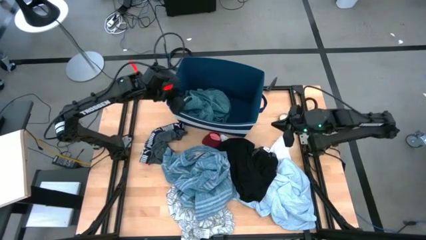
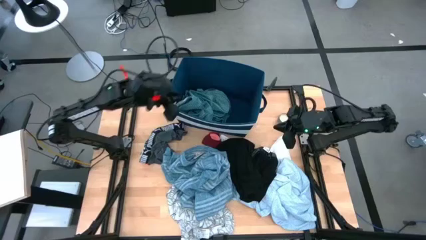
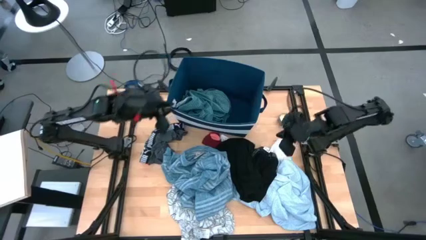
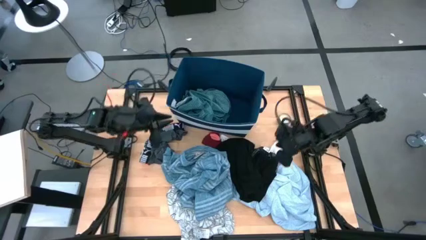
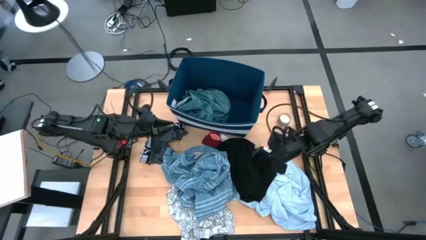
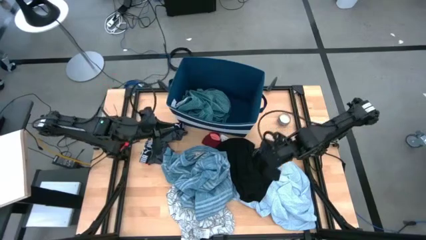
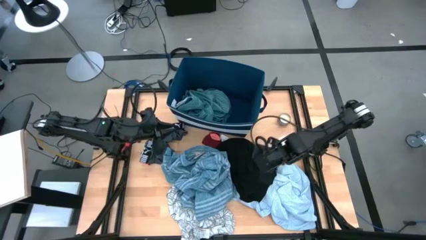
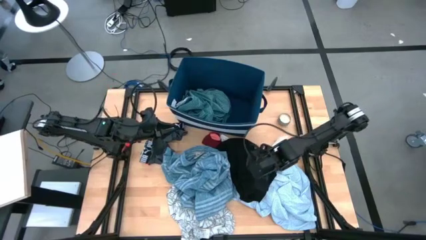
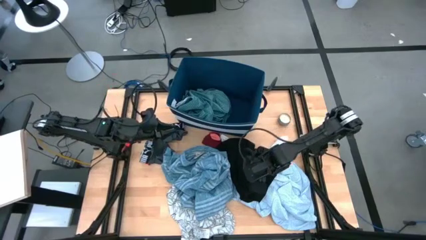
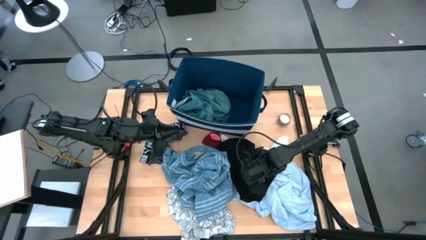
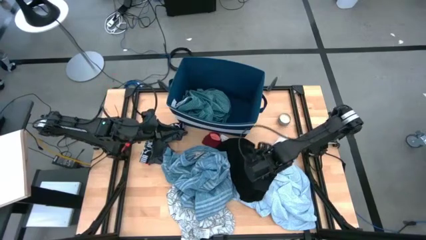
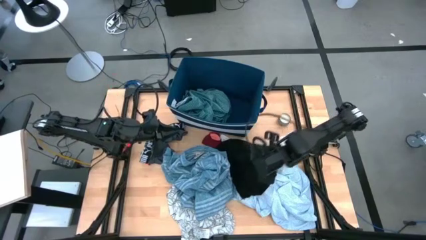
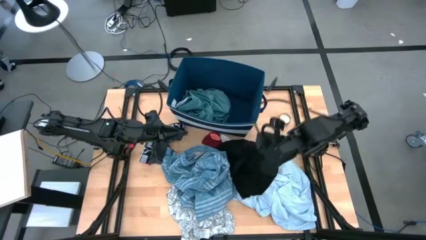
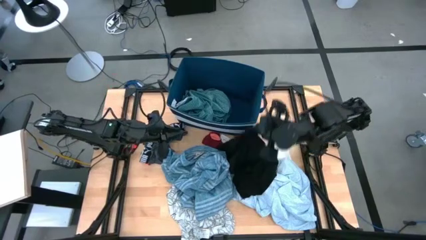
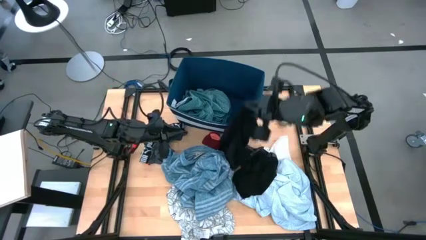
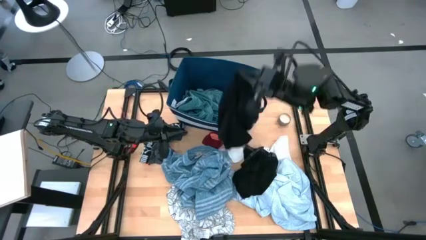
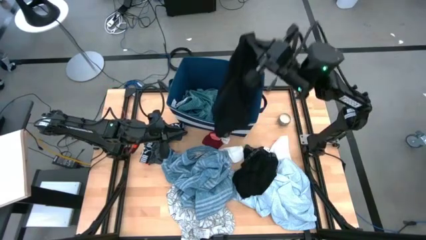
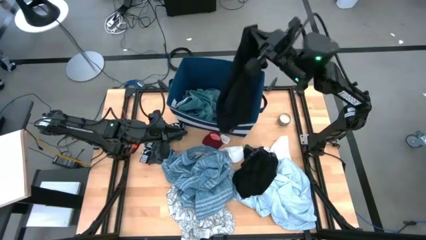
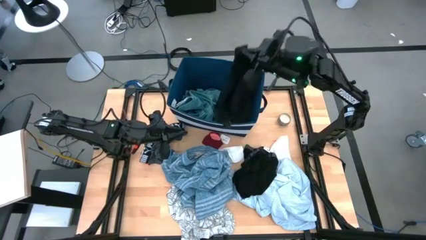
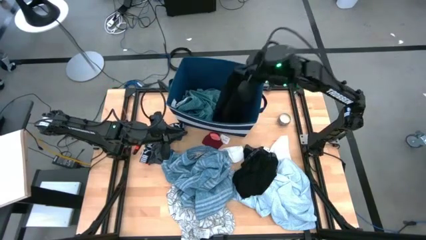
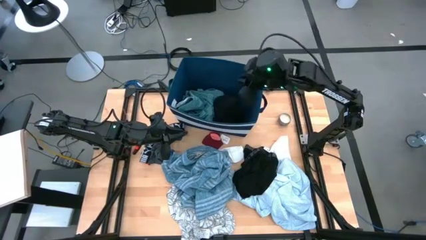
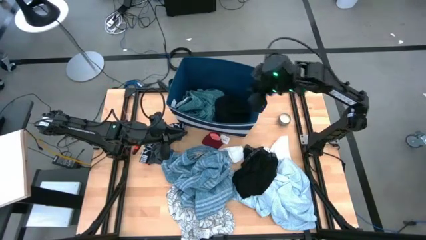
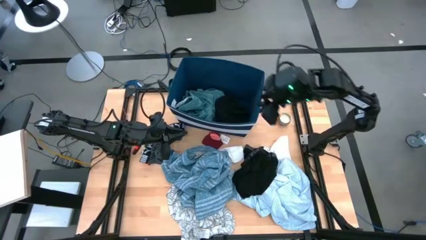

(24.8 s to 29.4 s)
Task: Sort clothes
Put the black boxer into the blue bin

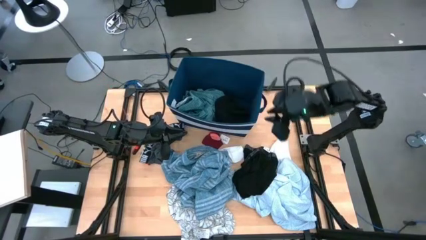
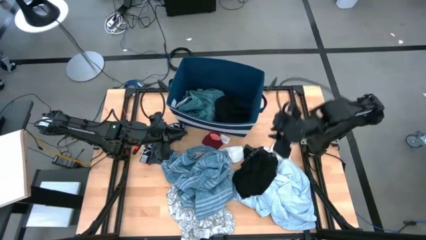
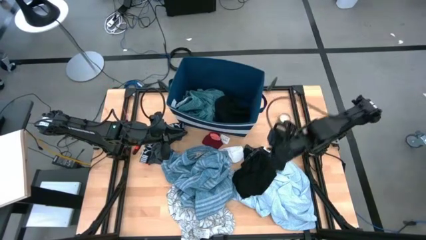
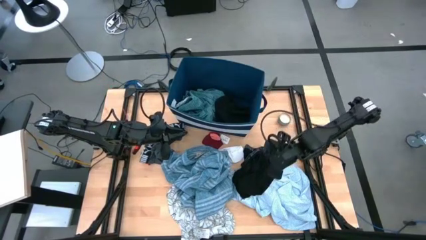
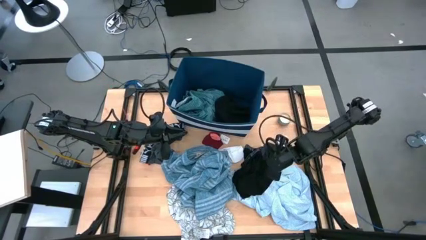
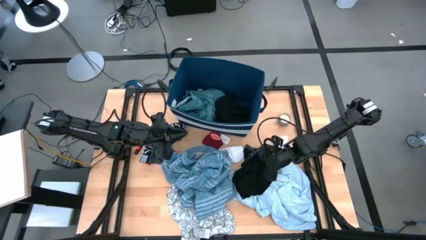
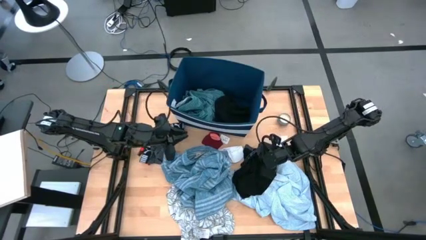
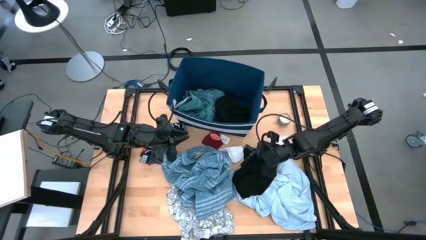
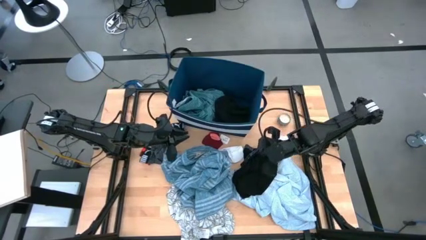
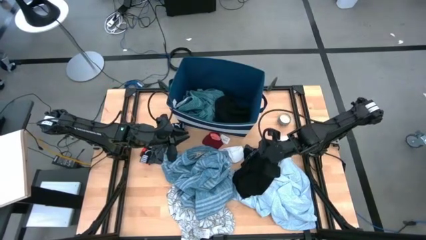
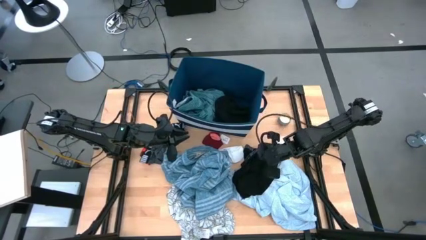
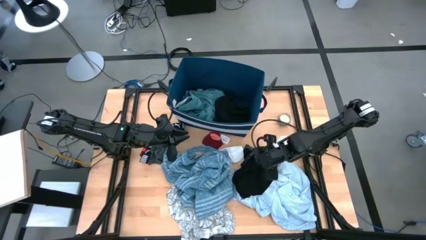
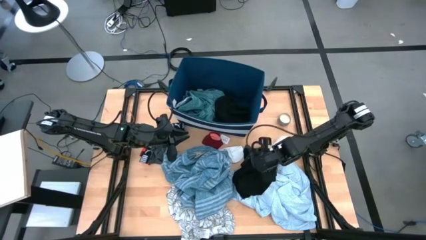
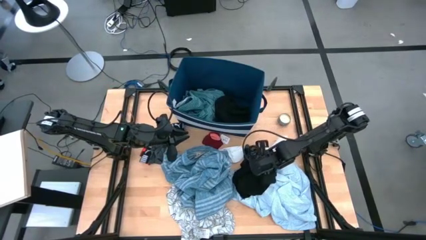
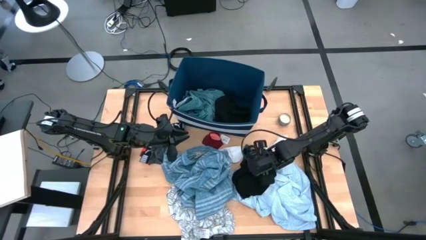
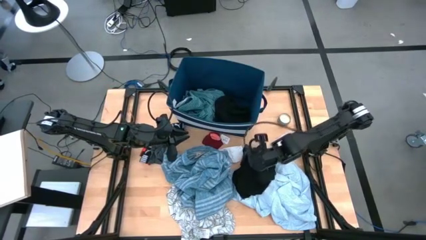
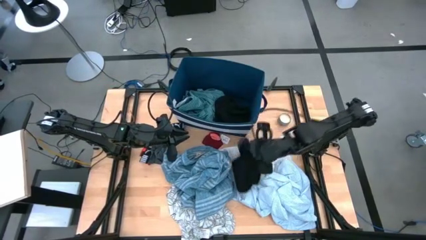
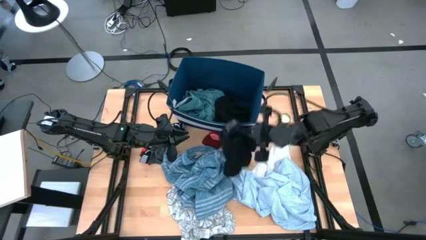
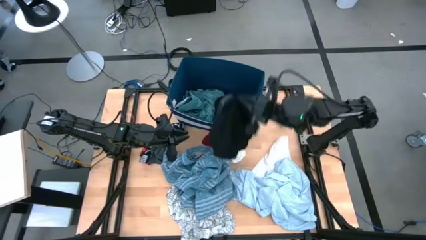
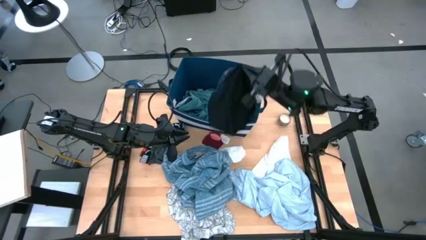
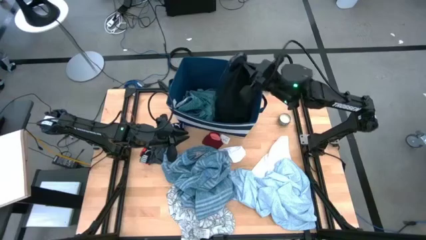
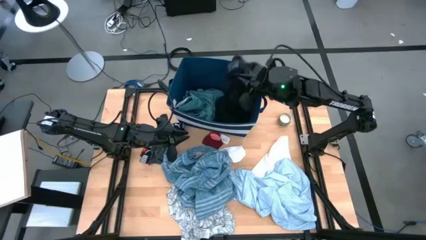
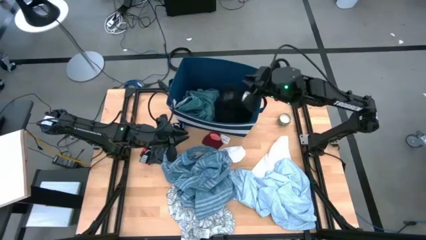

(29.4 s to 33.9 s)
Put the black boxer into the blue bin

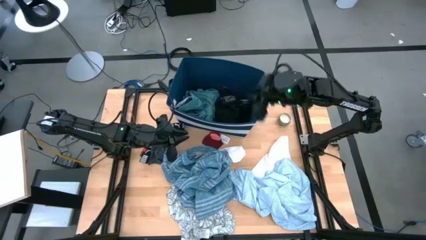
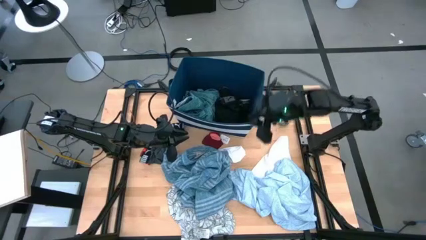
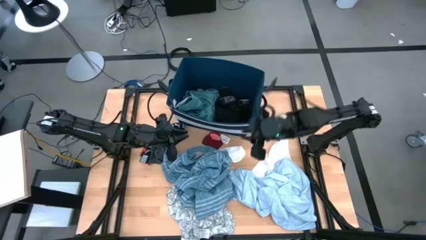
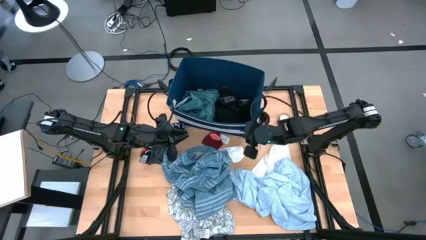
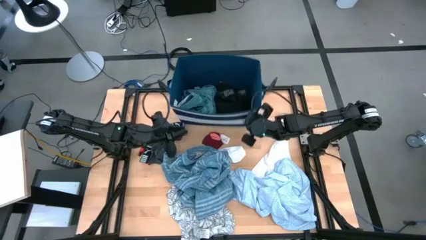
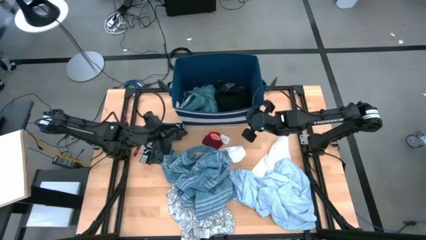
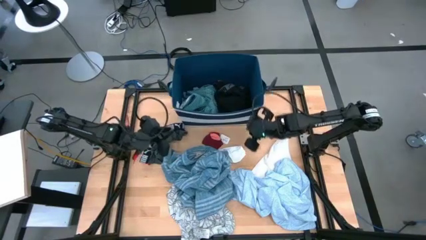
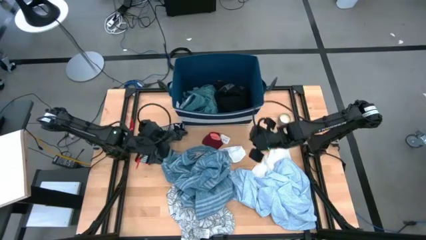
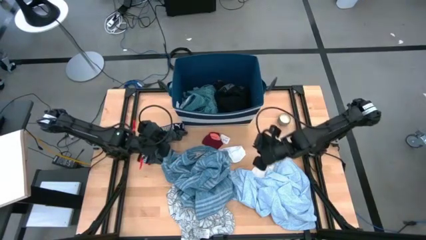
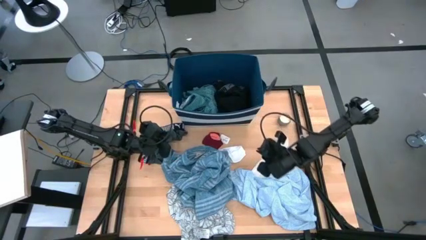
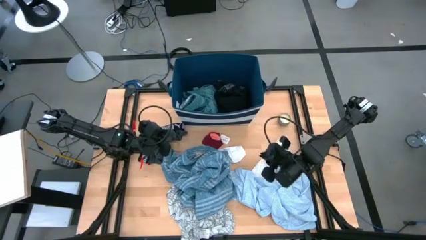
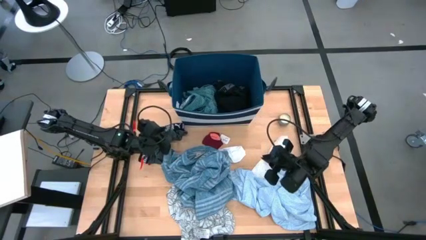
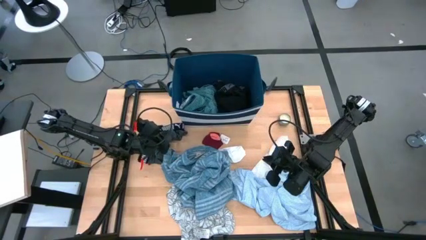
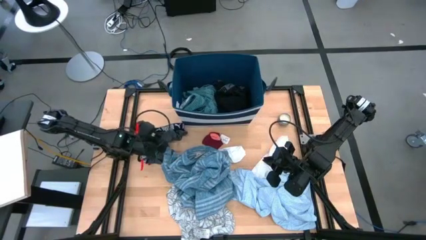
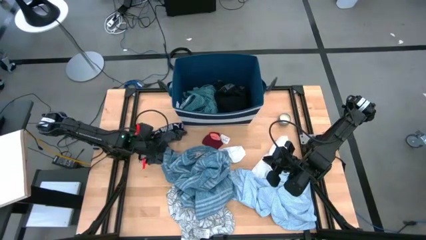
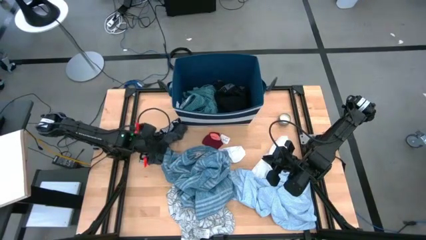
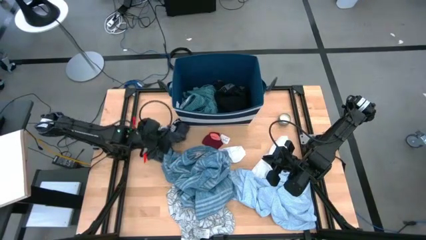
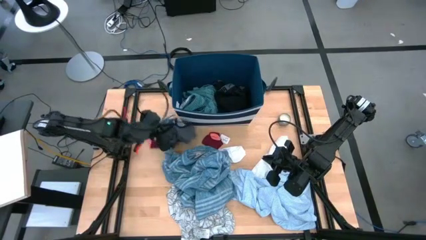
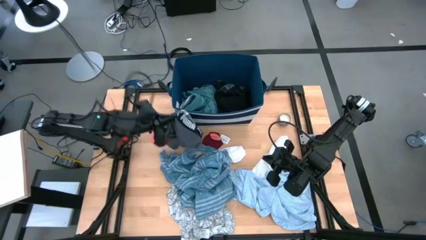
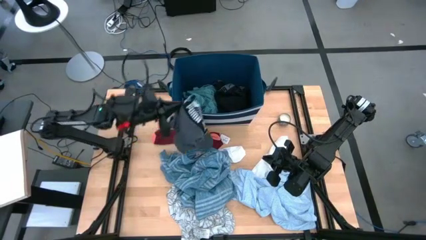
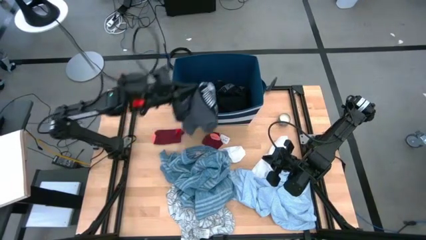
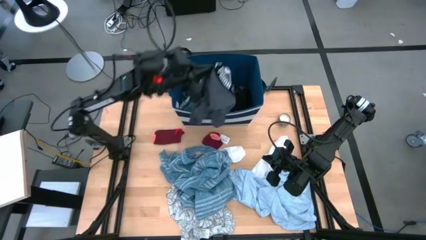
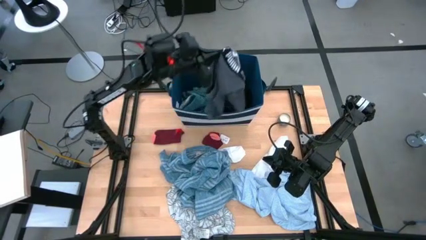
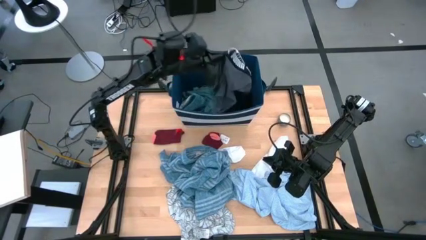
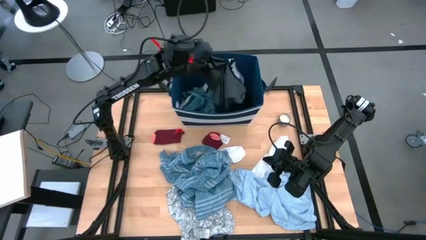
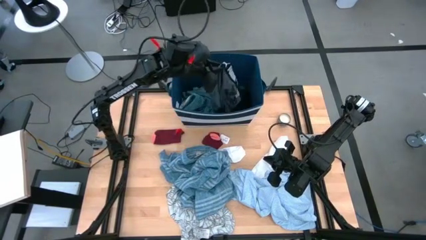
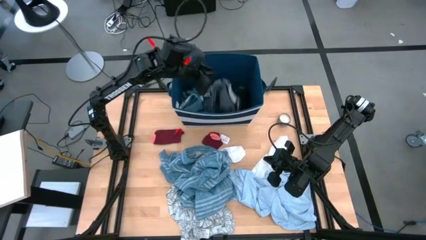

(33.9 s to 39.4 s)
Put the gray boxer into the blue bin
